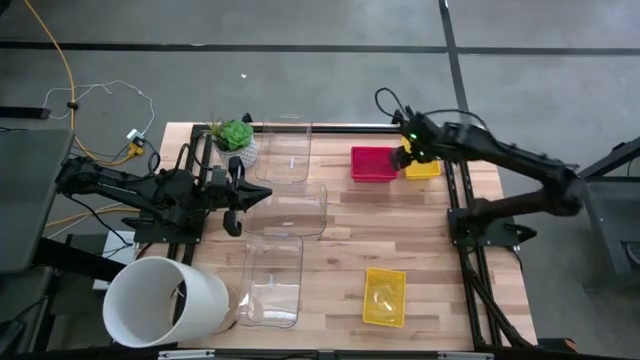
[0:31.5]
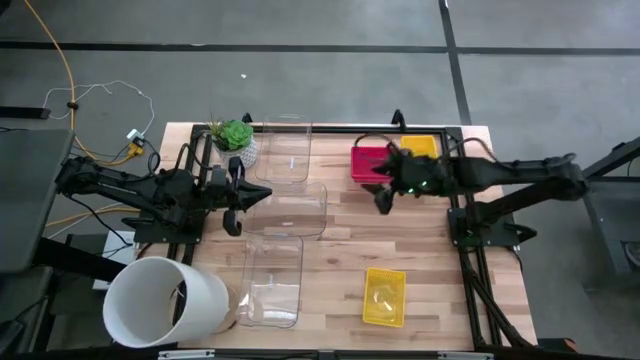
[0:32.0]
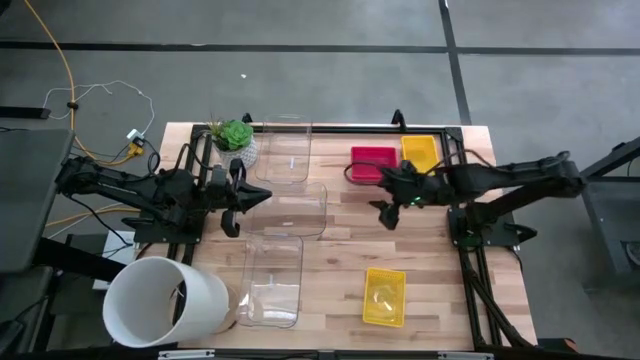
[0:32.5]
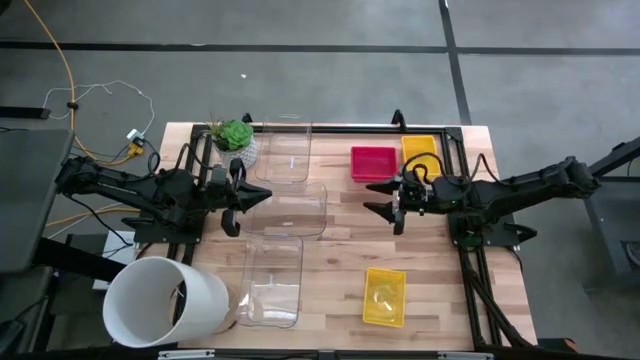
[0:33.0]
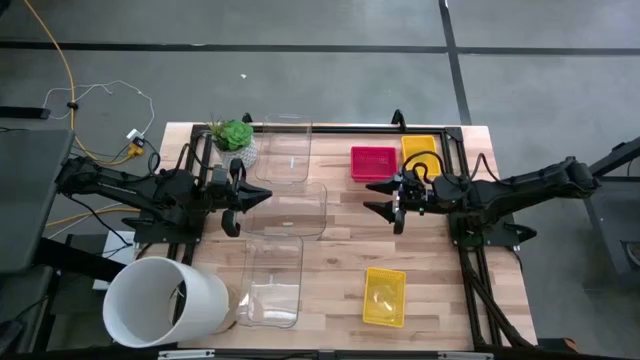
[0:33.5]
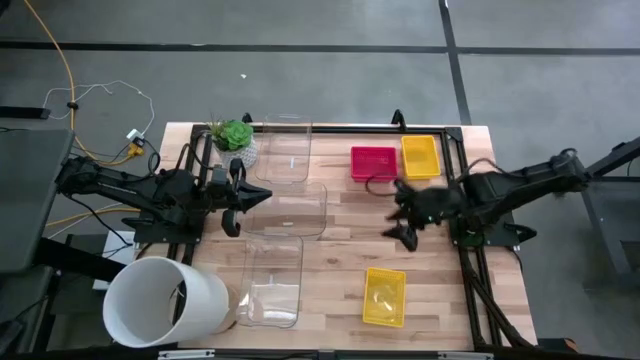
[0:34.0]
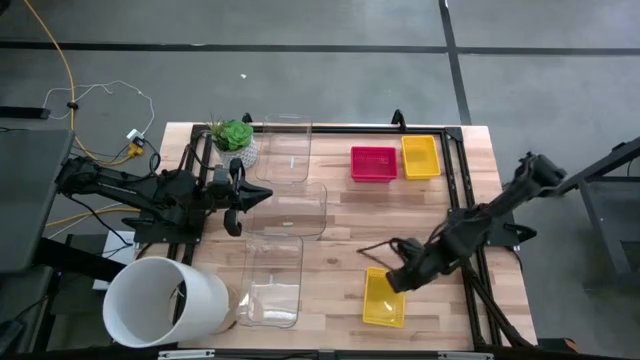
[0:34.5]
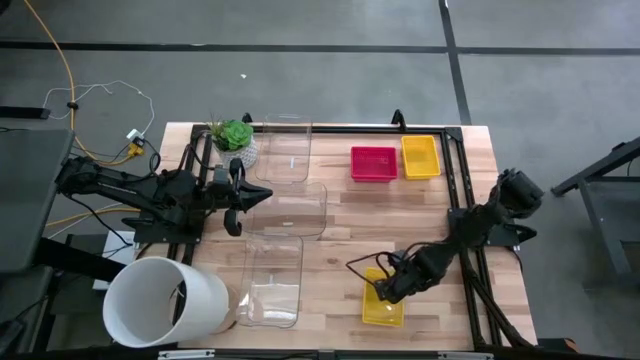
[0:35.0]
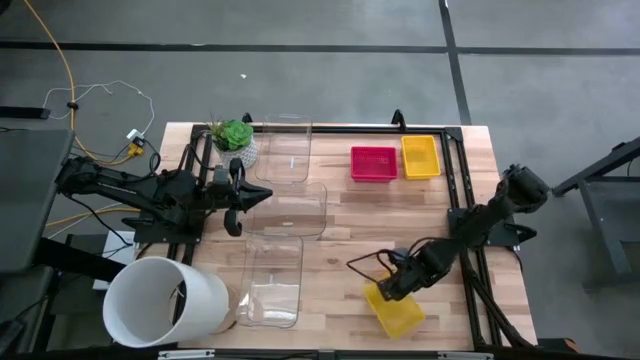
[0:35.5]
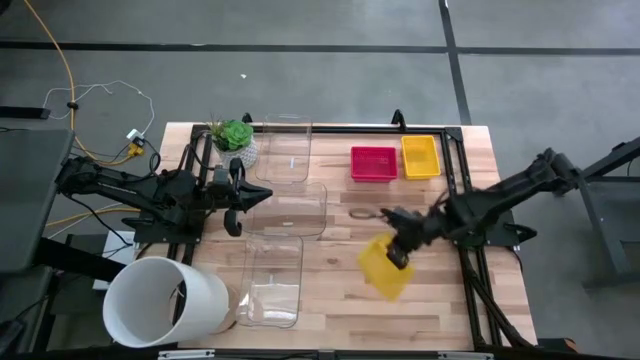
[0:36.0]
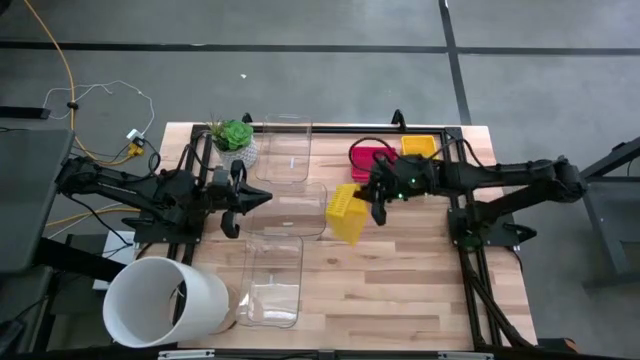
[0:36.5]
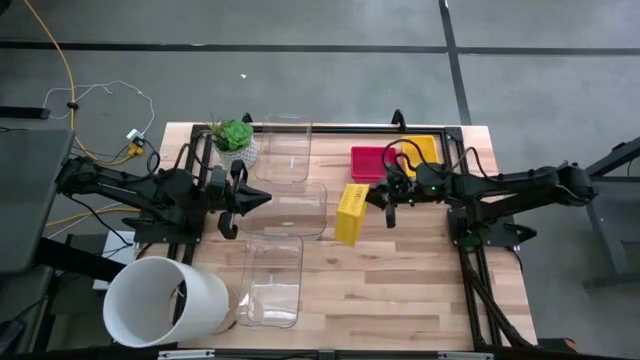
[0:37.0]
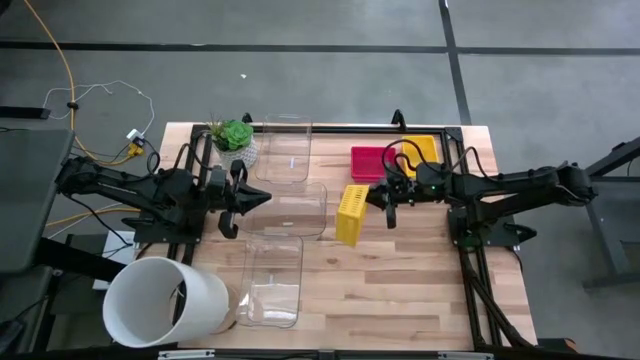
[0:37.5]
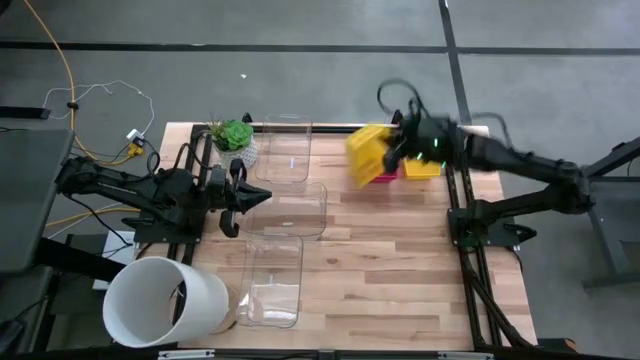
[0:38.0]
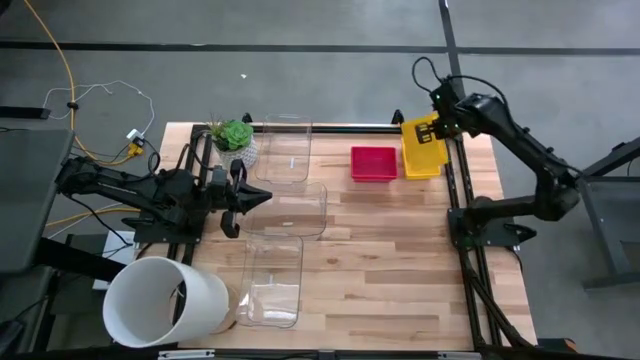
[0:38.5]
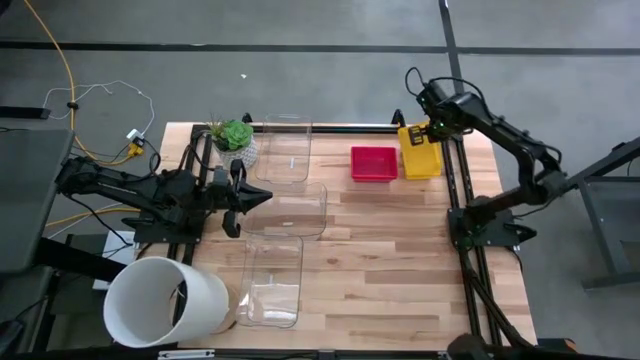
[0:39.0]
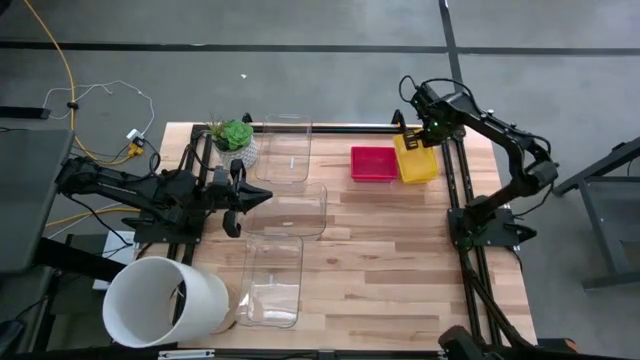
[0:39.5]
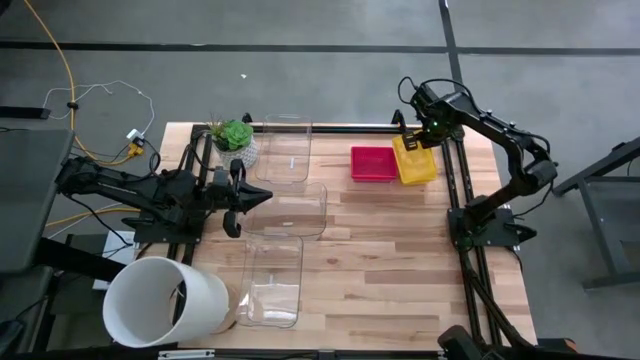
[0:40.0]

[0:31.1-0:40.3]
Stack the bottom yellow bin on top of the yellow bin

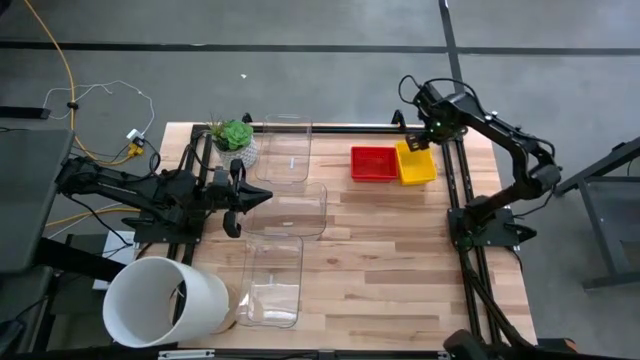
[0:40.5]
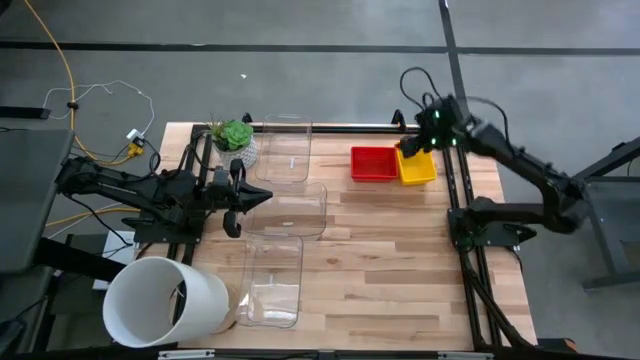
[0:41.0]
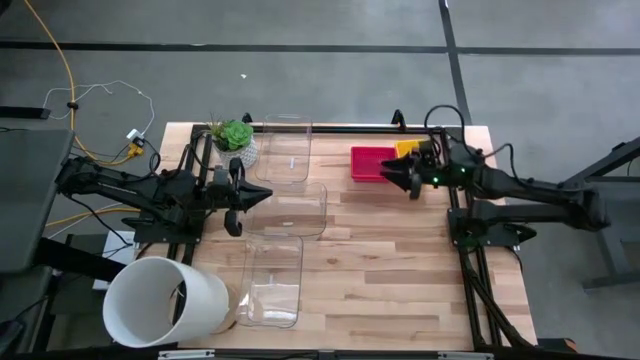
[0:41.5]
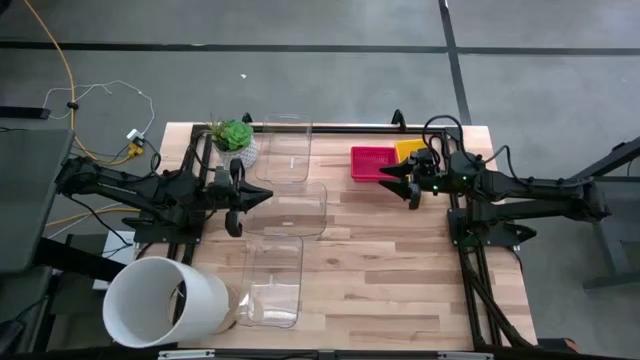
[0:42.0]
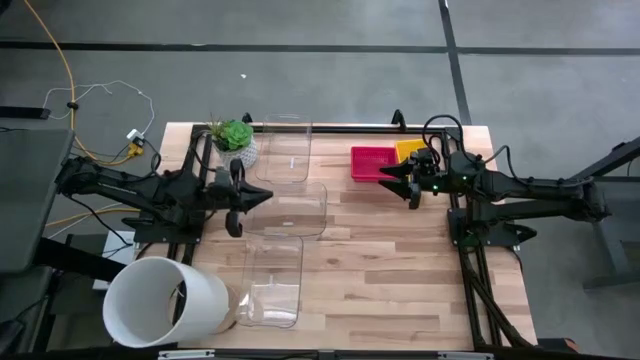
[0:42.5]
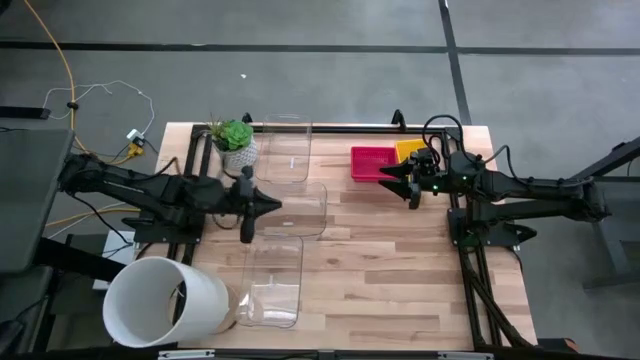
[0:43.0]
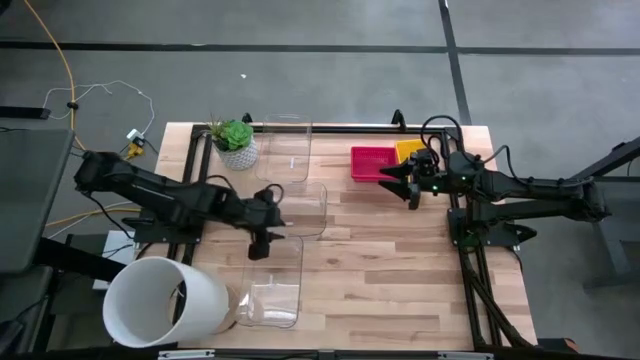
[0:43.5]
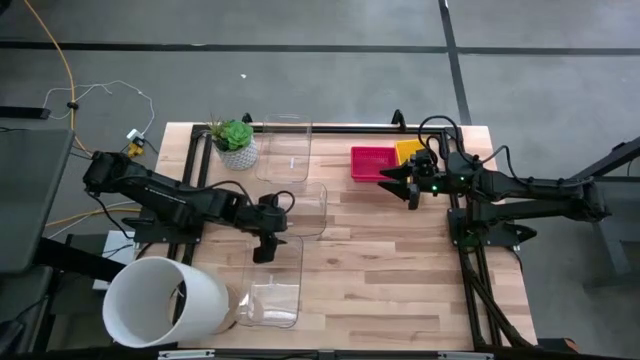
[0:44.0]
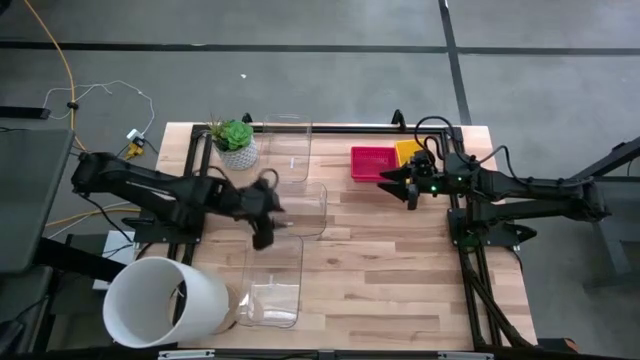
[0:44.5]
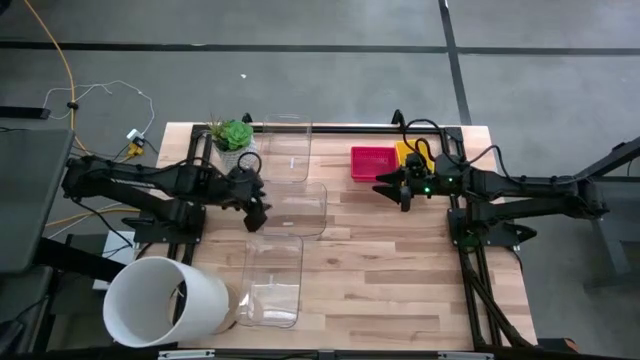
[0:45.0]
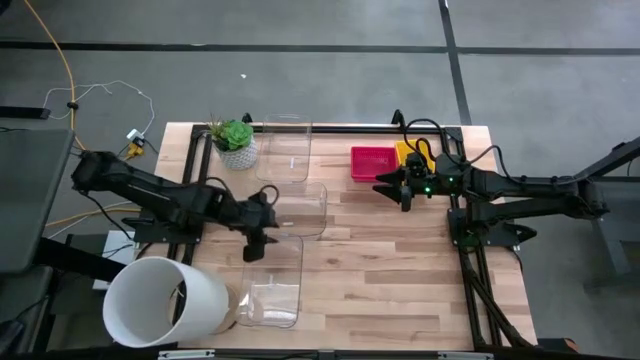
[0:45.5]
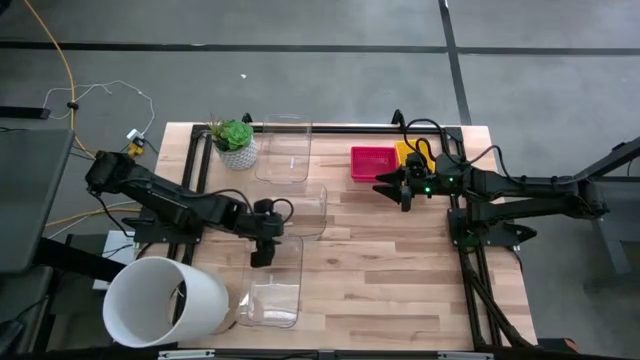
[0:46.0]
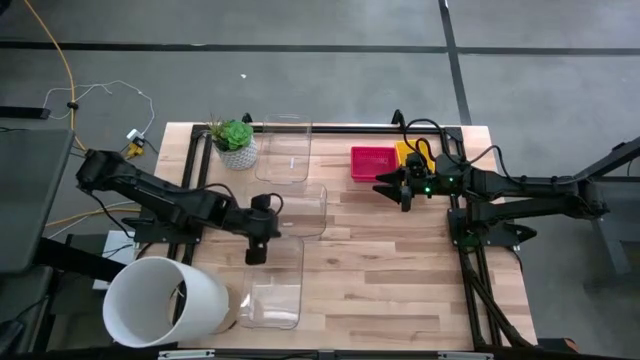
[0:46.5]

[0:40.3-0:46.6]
Stack the bottom transparent bin on top of the middle transparent bin

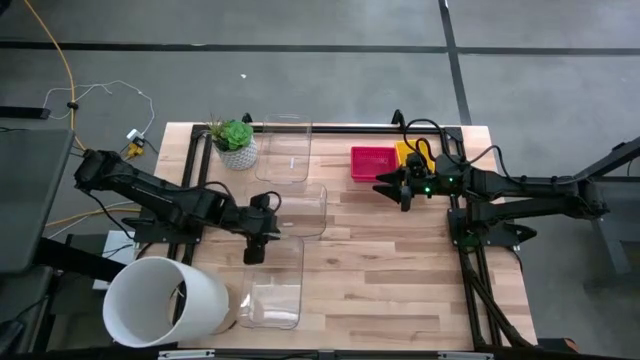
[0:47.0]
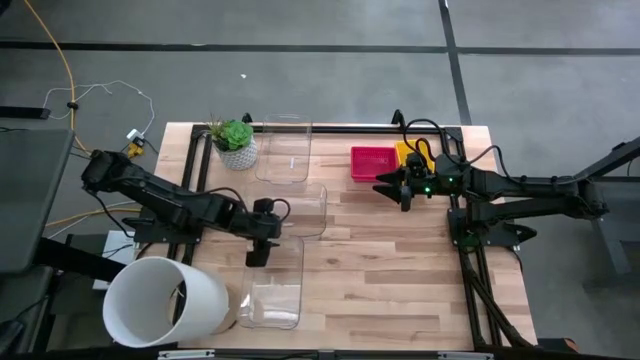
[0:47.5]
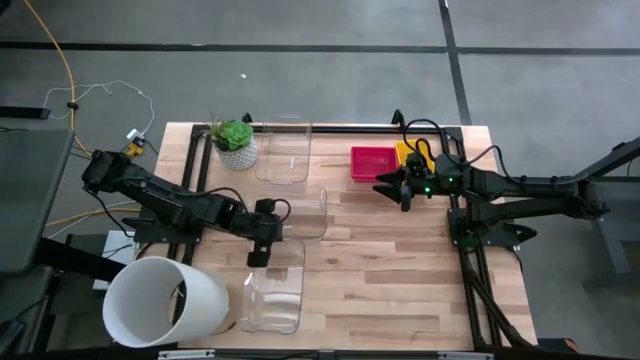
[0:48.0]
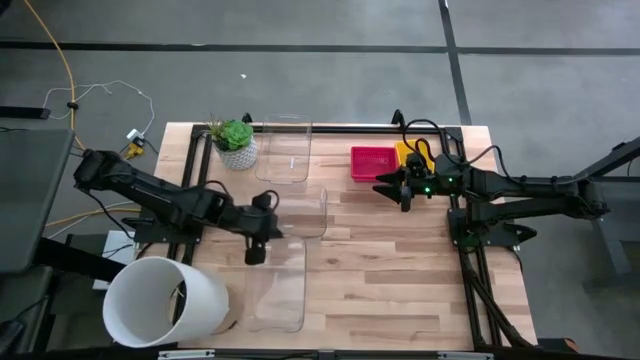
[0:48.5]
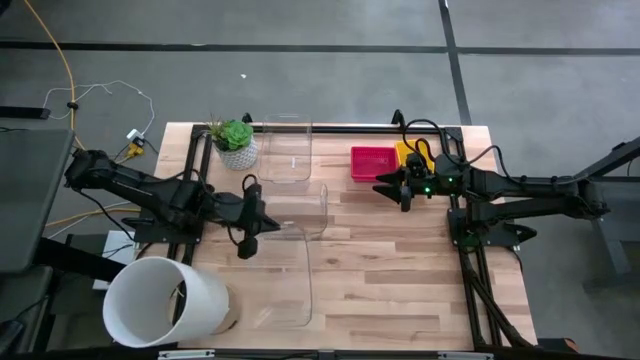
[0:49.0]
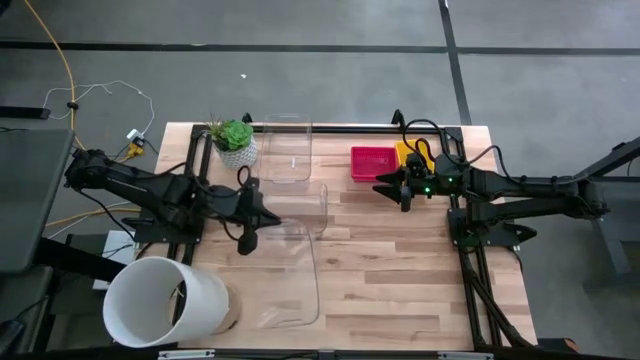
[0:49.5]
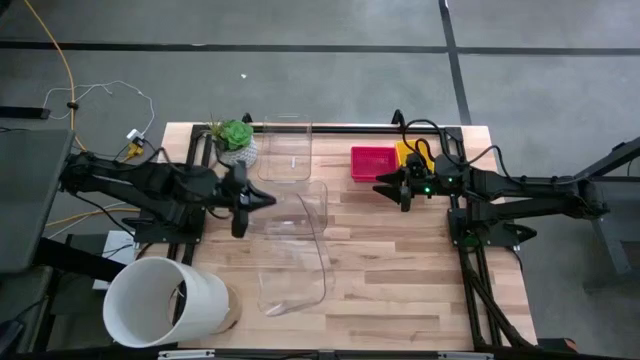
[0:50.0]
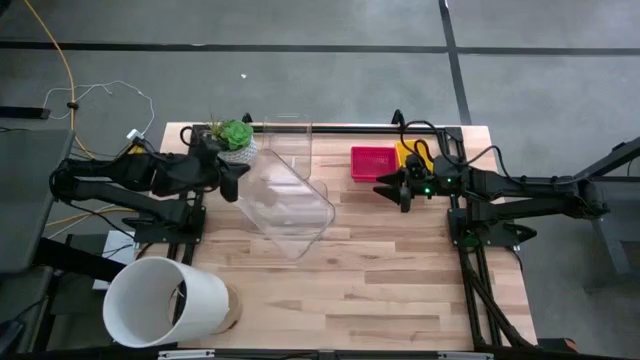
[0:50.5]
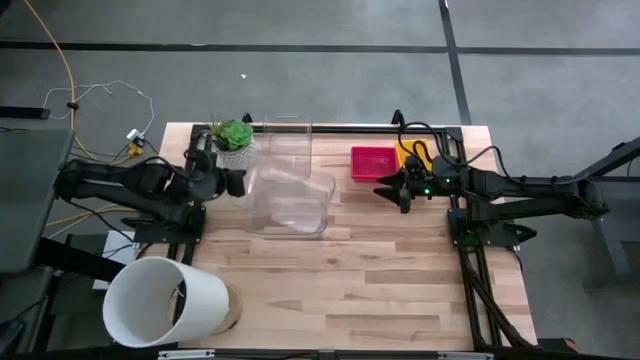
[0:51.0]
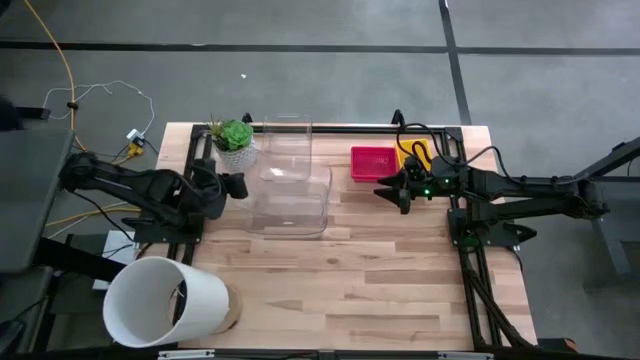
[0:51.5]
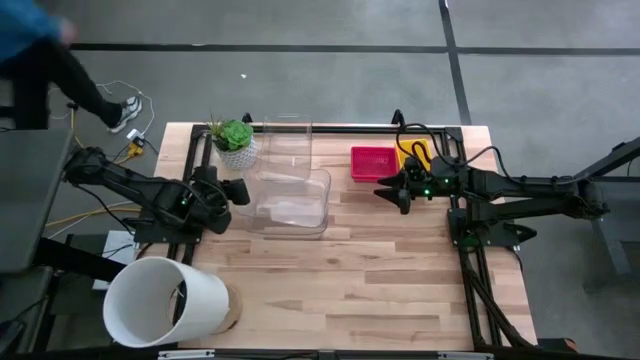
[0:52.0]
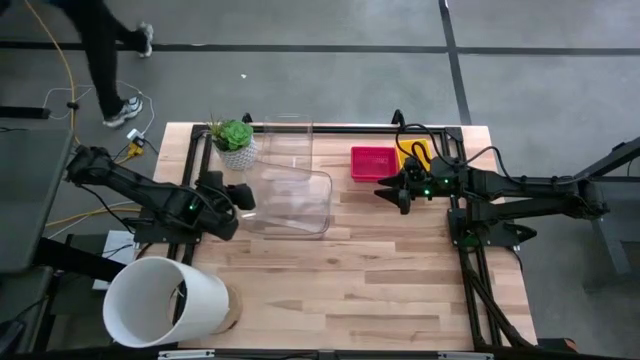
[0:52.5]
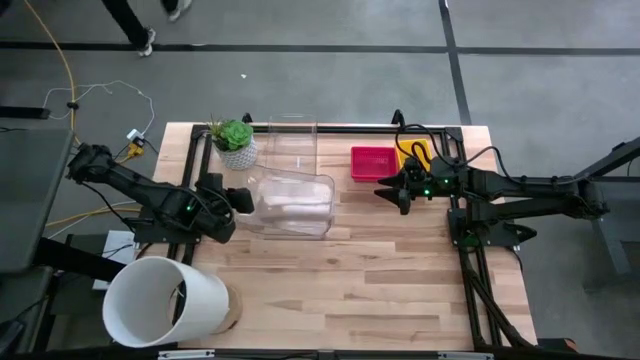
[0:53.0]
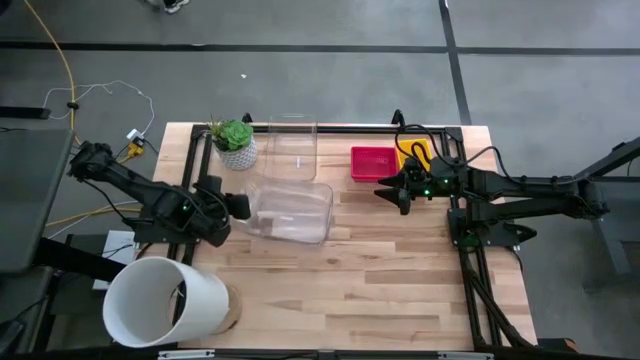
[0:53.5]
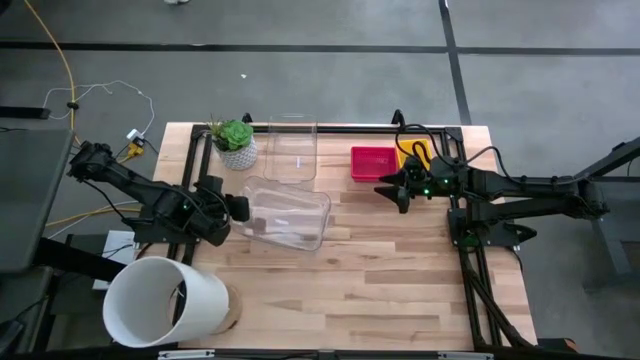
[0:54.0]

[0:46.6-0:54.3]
Stack the bottom transparent bin on top of the middle transparent bin
